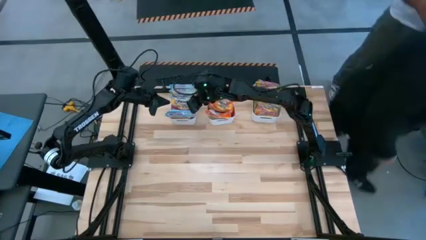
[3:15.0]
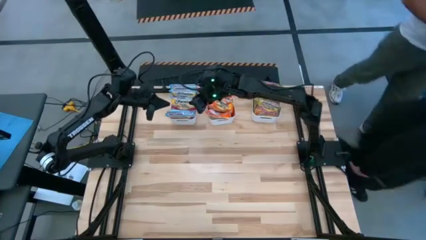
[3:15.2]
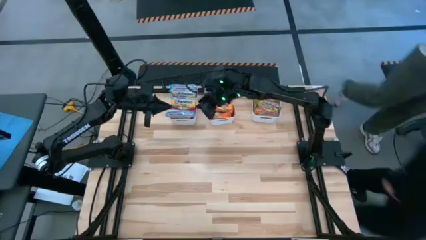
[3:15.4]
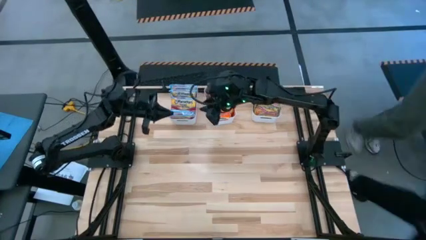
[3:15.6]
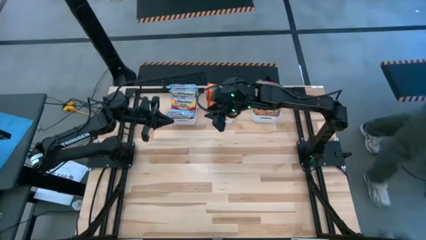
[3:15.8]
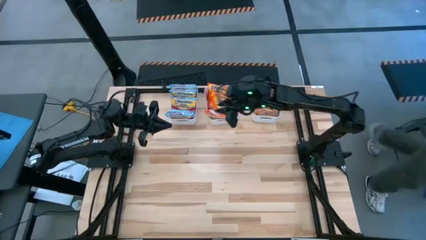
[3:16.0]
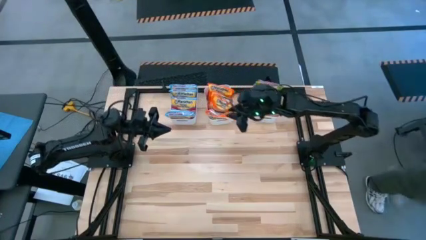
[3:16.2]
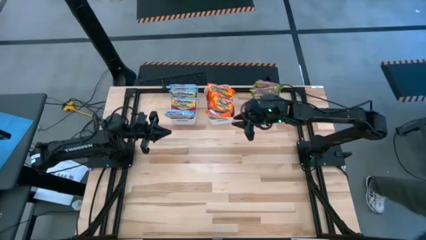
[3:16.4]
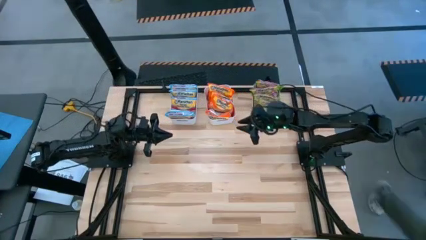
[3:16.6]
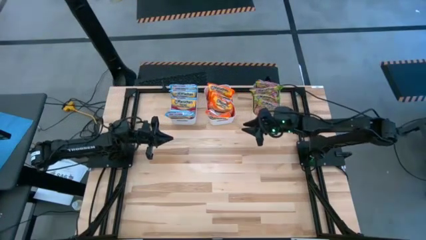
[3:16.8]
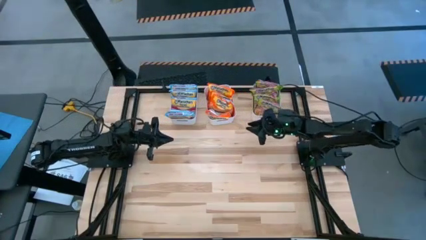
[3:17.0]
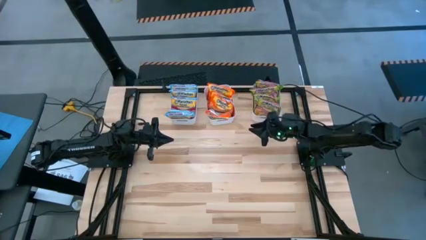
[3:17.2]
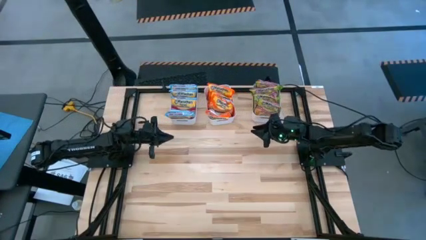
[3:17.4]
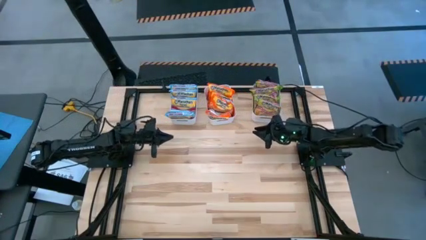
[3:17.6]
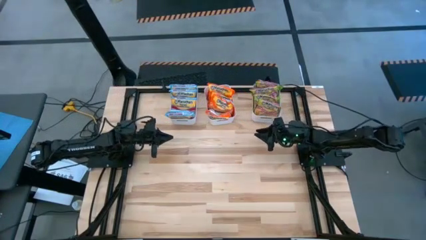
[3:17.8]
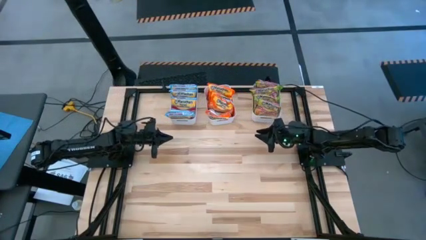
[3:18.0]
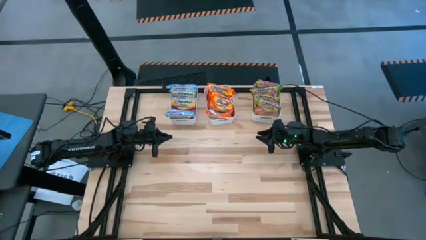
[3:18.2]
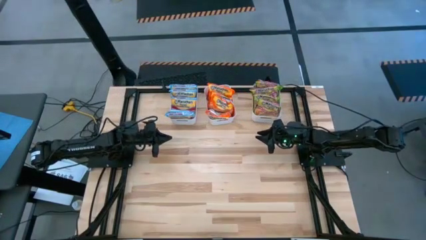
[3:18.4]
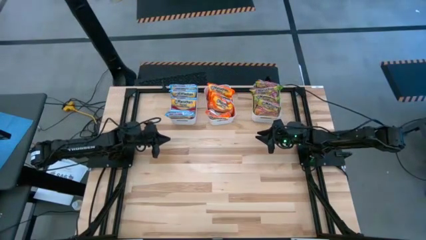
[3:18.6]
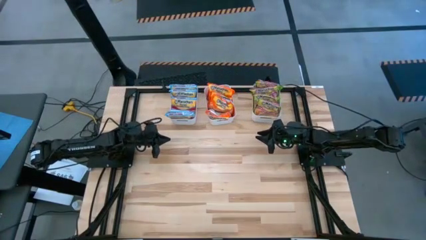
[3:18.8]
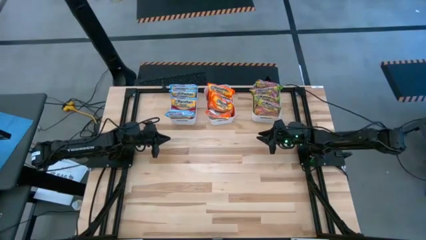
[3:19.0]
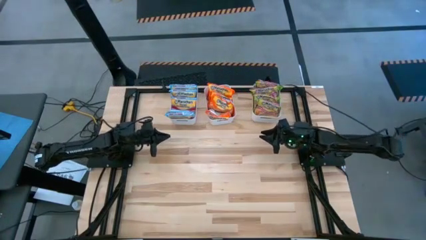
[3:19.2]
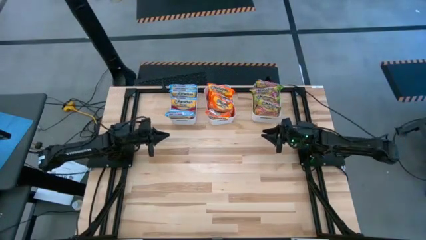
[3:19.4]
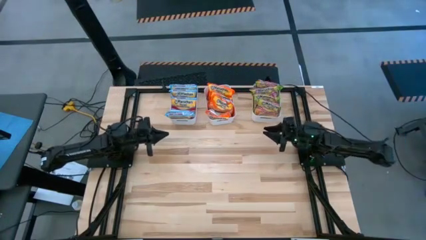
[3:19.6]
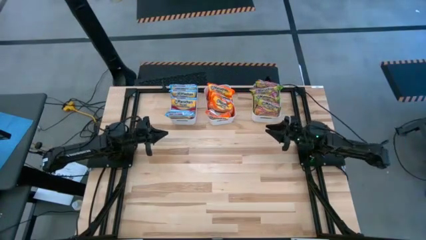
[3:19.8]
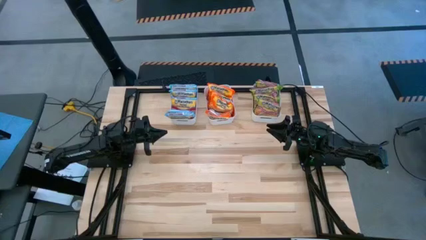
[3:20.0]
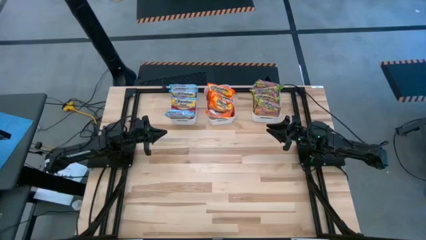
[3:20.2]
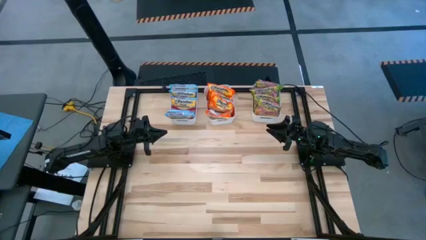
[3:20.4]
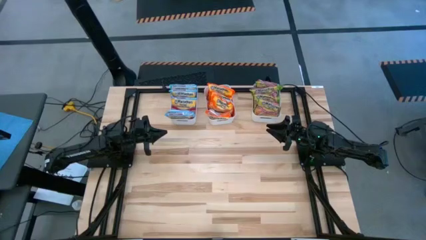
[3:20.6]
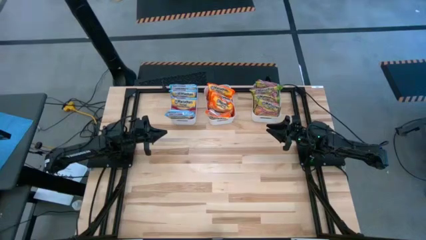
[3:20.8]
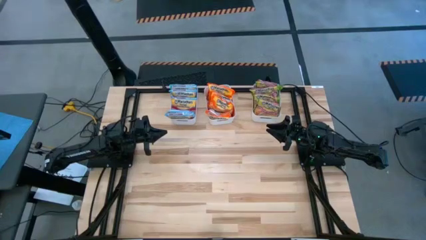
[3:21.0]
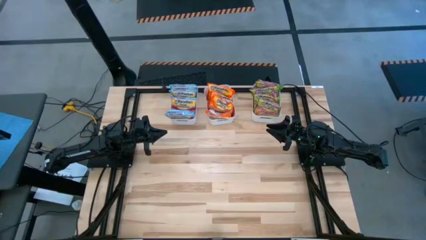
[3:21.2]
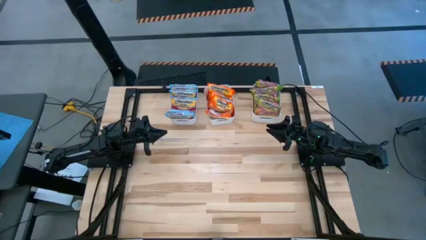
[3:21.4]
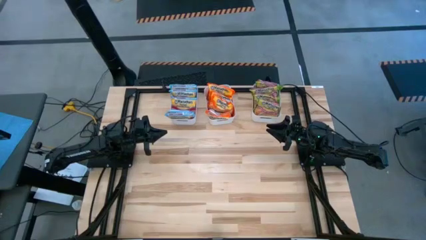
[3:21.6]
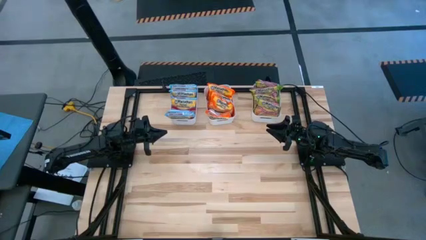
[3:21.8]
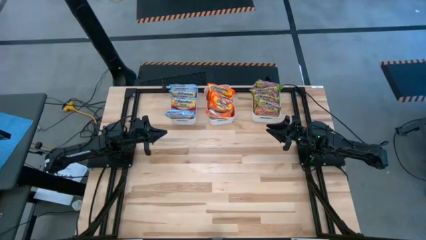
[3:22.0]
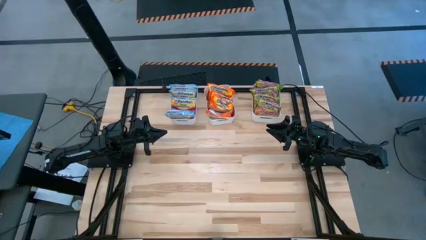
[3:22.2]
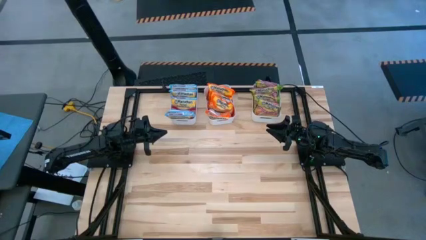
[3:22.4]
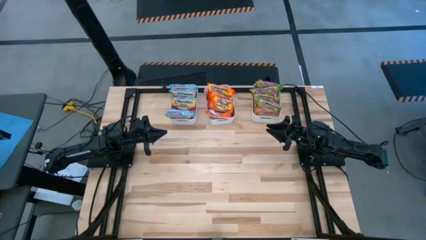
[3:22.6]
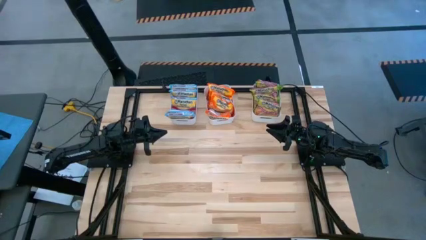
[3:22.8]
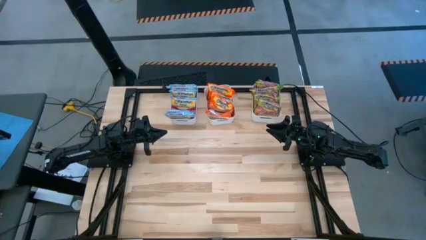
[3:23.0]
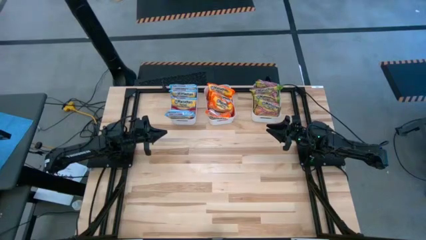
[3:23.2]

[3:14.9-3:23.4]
Task: Sort Maruchan noodles
Return to Home Position

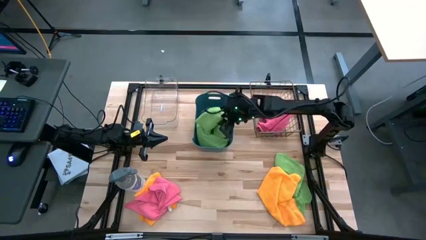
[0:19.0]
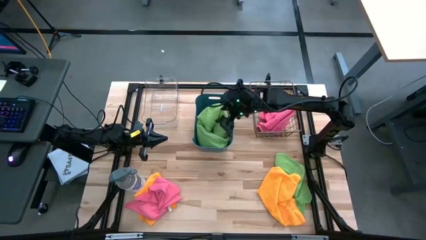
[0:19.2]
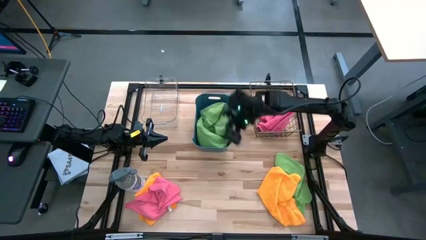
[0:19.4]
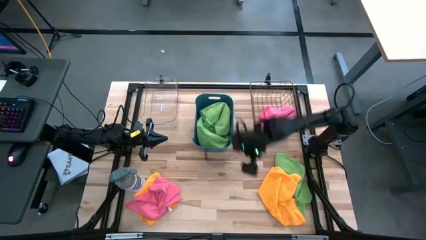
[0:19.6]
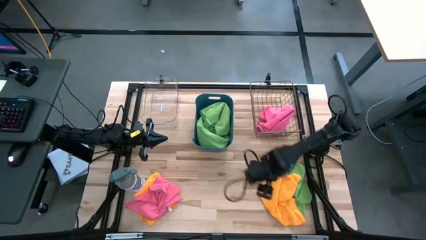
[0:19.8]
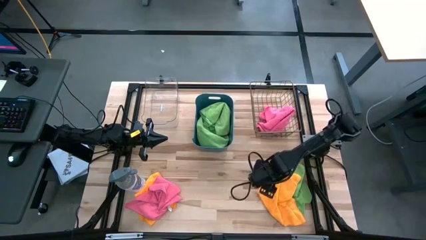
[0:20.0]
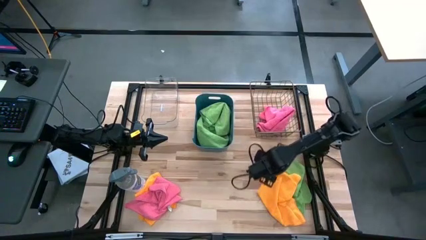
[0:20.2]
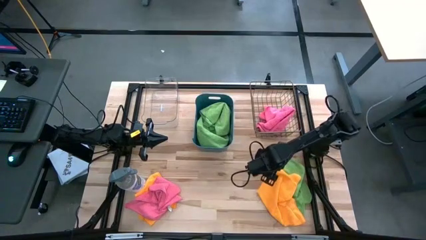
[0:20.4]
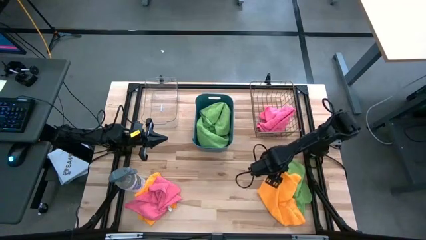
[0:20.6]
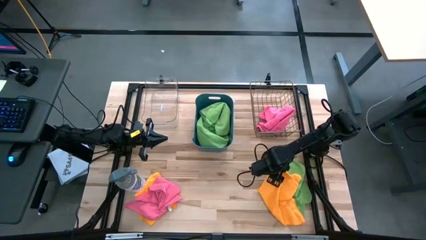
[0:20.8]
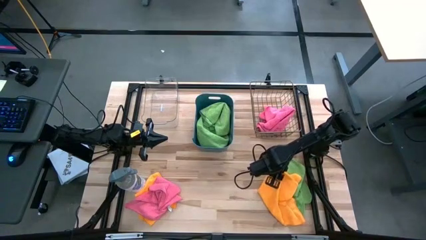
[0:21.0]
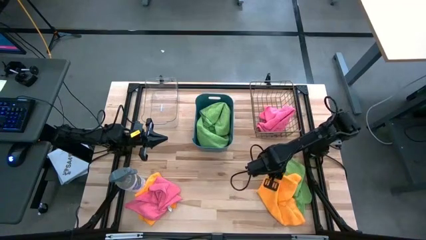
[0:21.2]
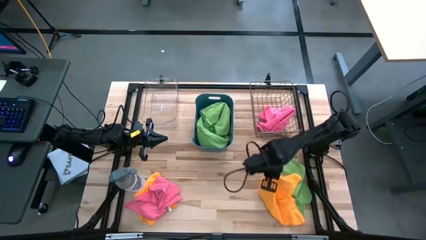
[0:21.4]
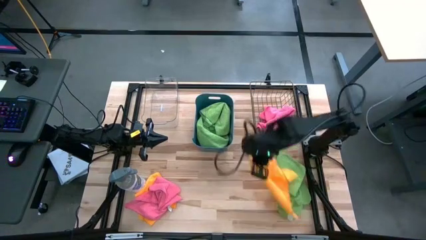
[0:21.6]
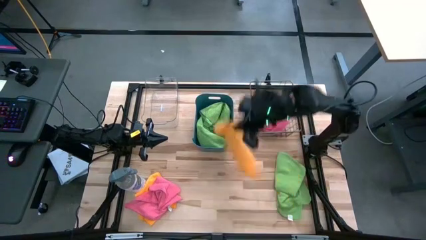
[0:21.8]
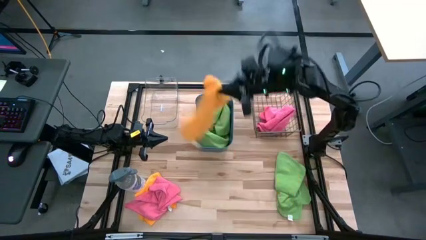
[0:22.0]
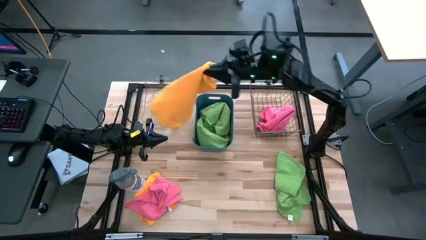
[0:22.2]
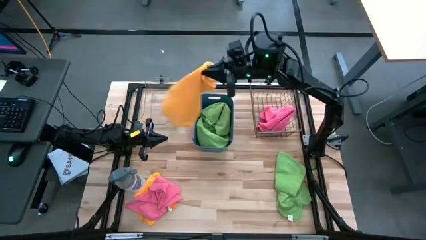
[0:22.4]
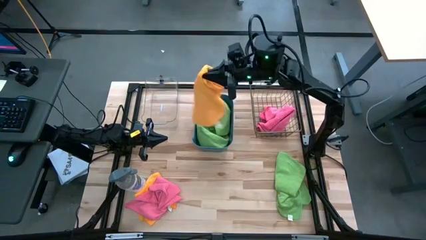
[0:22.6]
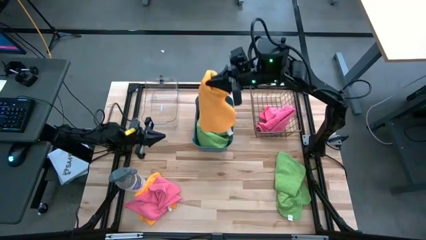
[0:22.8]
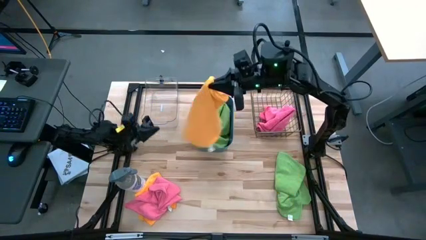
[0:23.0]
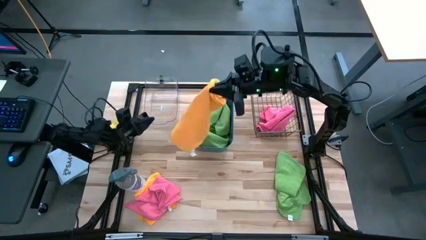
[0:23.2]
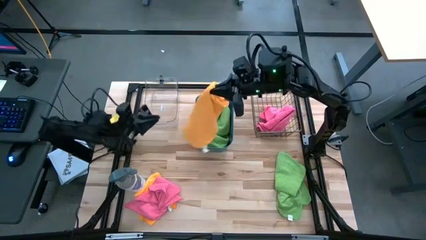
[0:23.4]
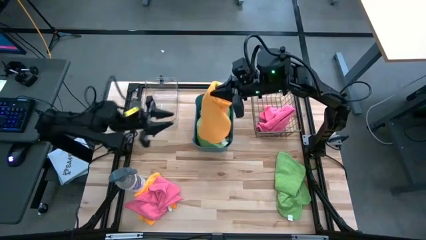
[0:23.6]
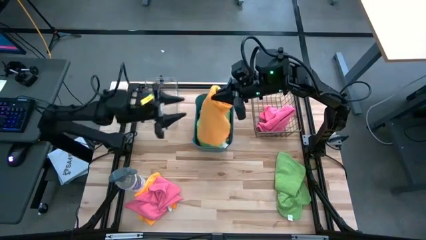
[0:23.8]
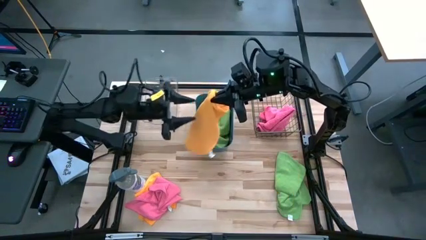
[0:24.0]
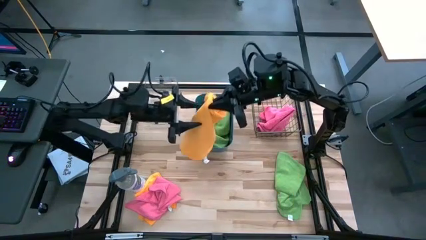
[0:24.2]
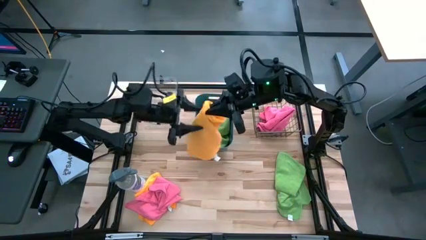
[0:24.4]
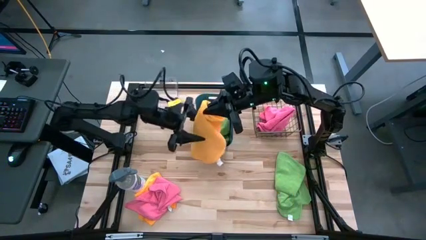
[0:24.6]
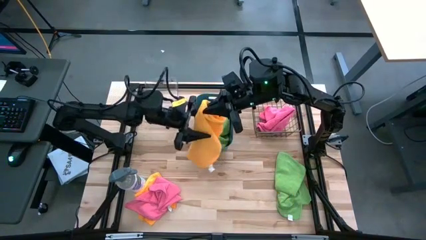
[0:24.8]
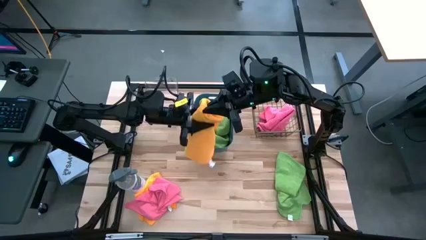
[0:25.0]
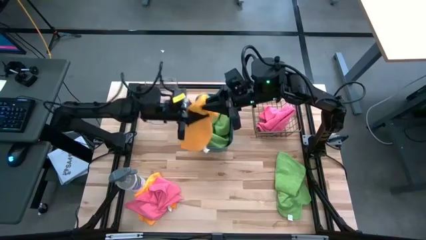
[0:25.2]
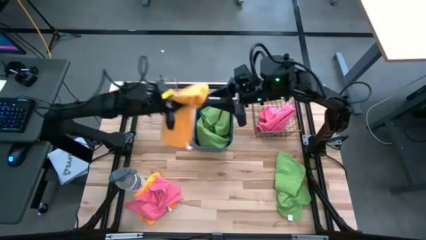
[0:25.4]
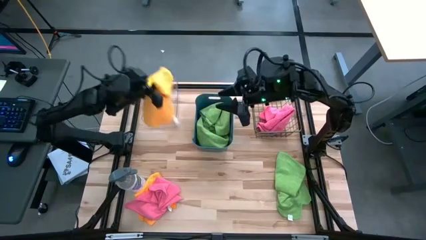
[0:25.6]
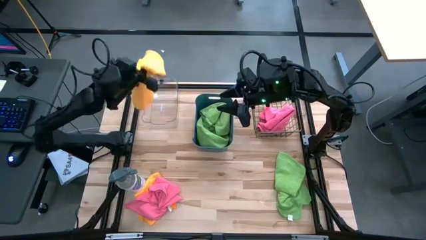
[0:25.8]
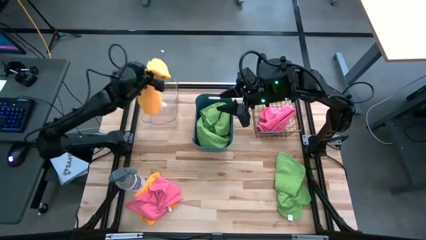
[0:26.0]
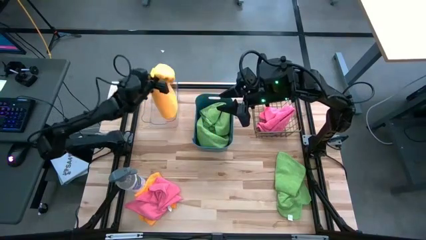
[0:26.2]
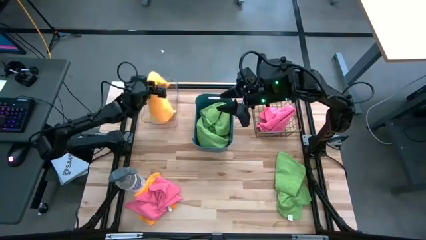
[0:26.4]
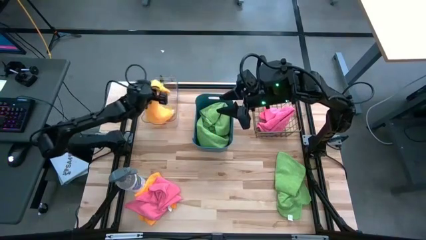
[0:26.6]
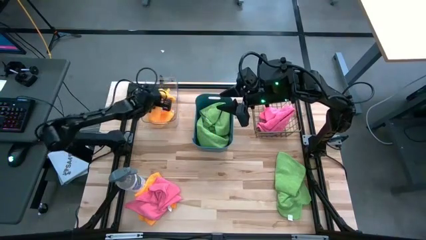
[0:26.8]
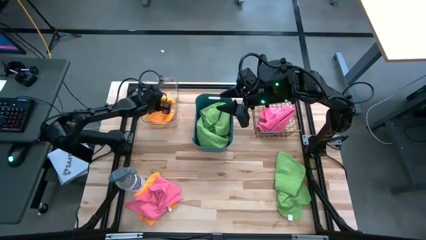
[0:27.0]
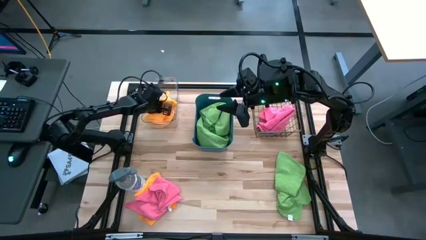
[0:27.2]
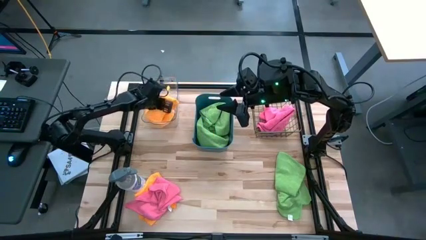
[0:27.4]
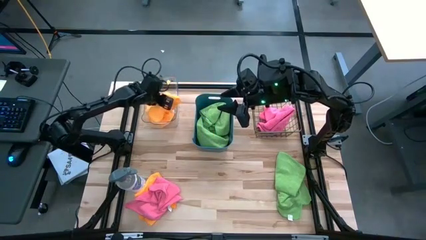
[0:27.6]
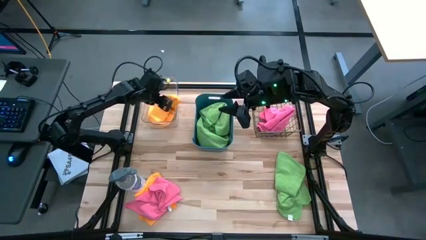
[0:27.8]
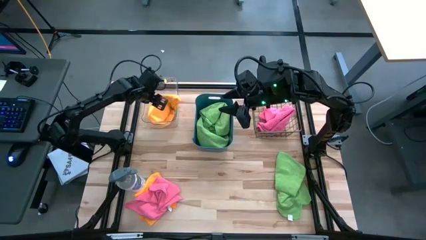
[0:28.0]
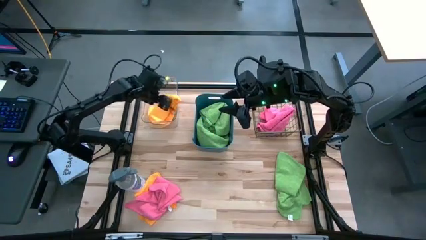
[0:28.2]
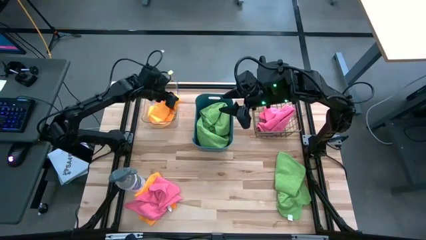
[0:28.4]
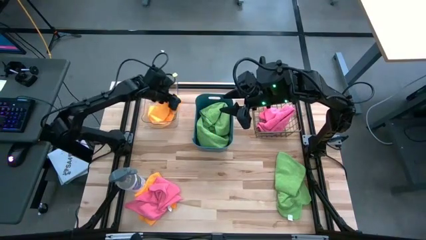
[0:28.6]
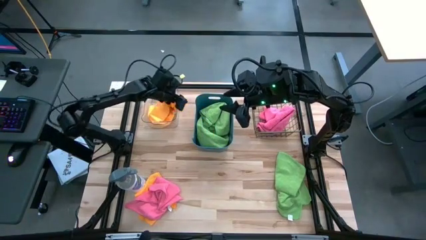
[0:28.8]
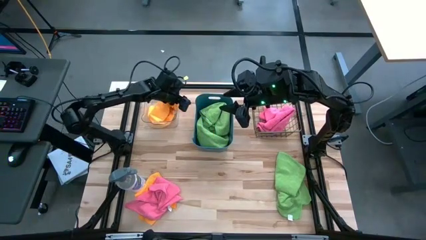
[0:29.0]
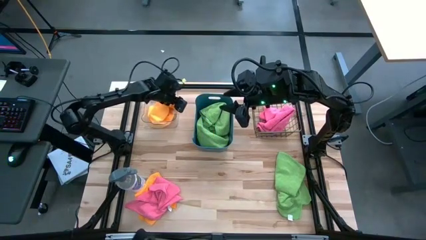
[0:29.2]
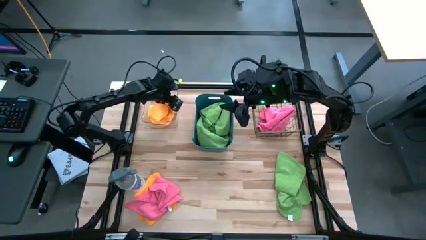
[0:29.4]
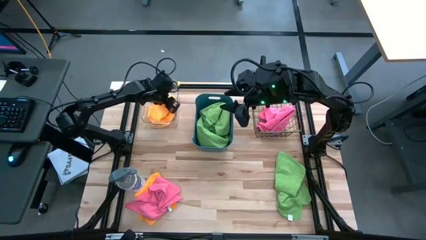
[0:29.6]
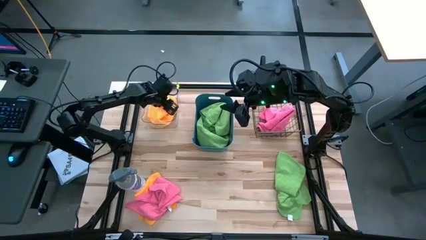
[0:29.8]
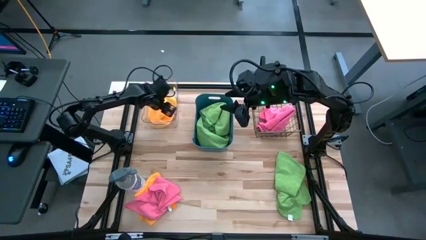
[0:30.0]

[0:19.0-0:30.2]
Task: Sort microfiber towel by color & place in baskets
Put the right yellow microfiber cloth into the transparent bin
